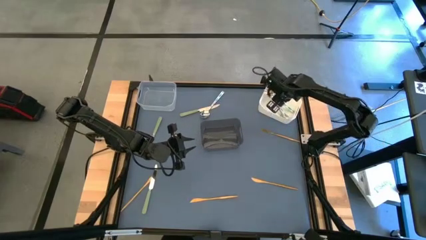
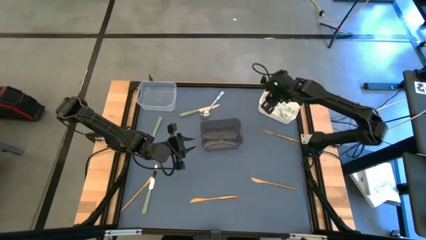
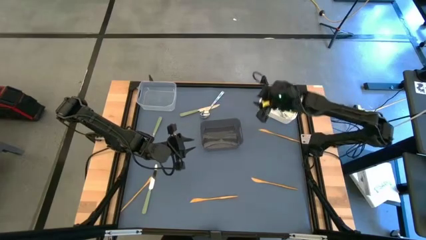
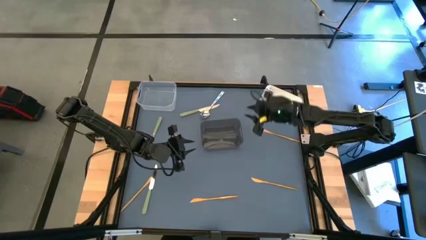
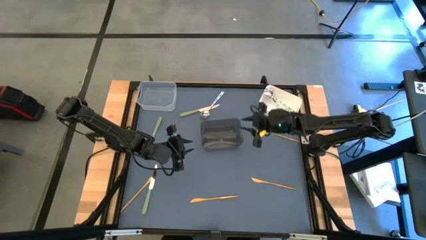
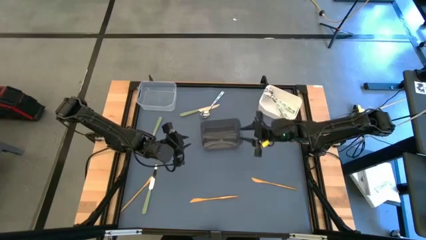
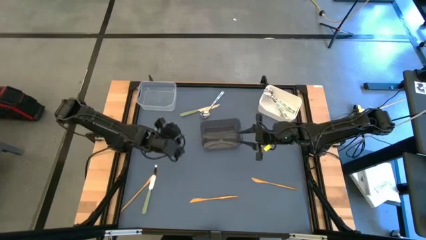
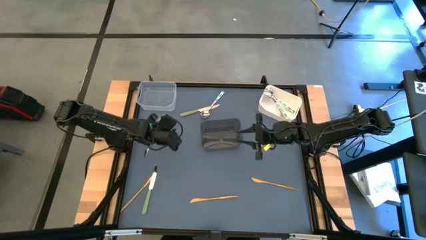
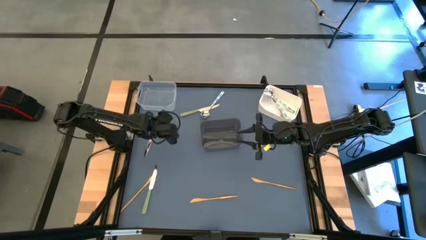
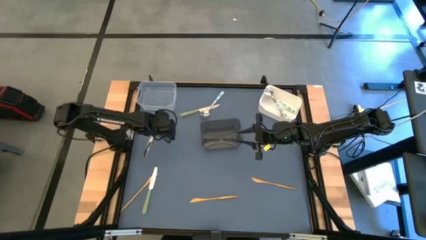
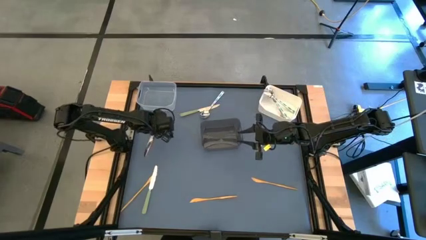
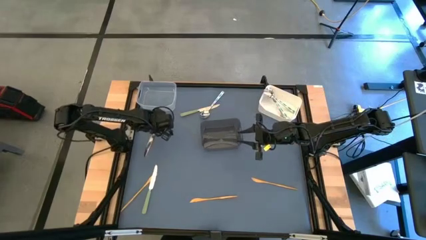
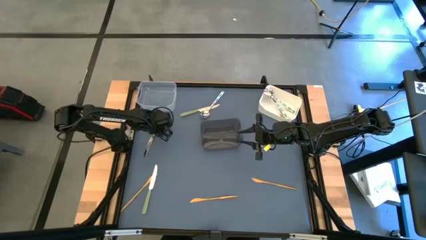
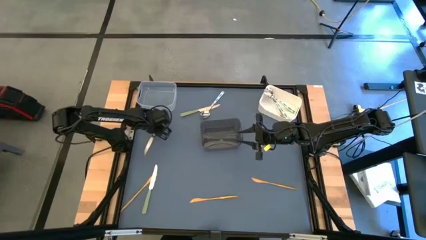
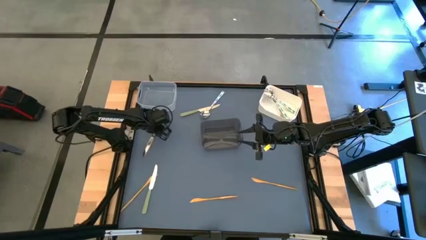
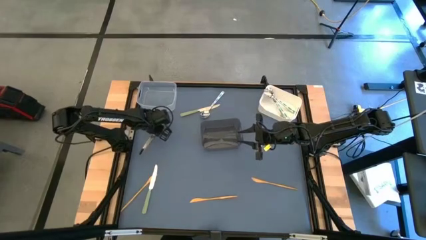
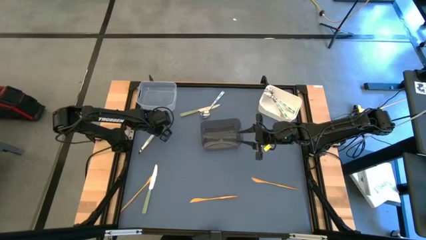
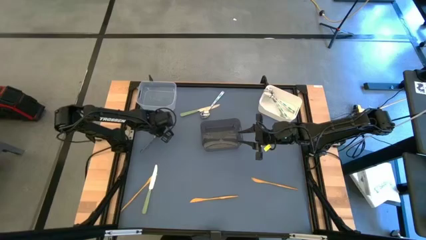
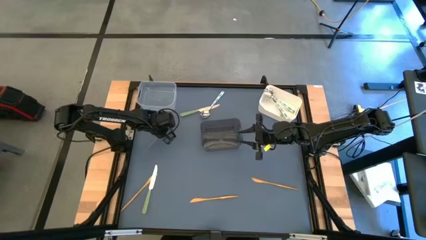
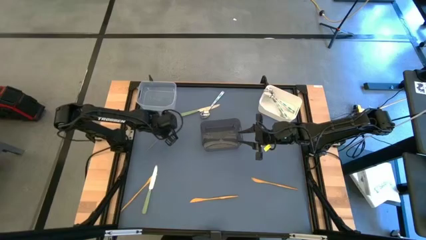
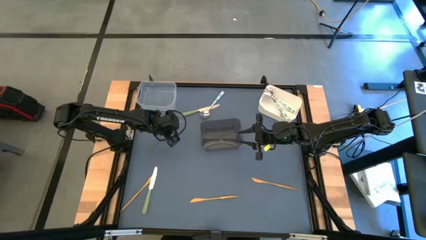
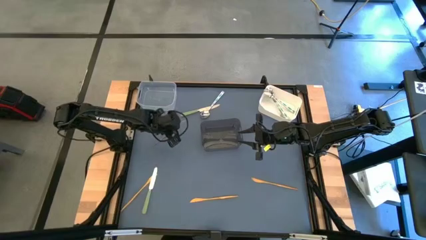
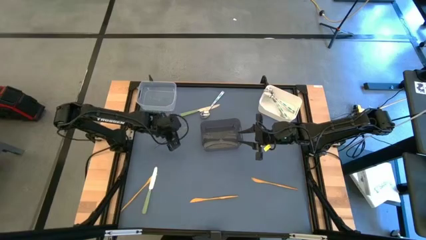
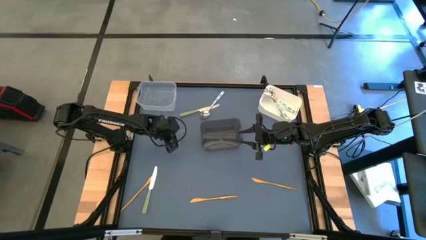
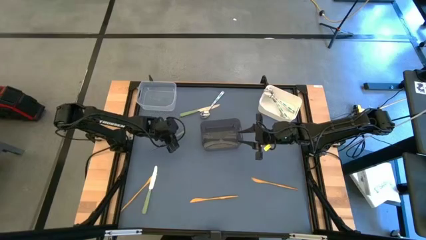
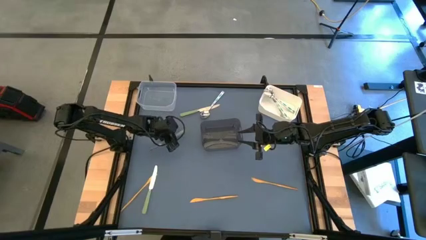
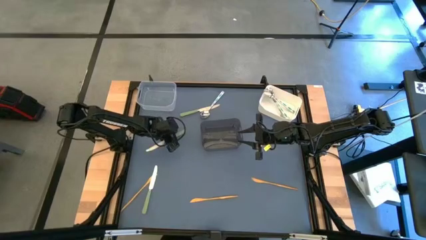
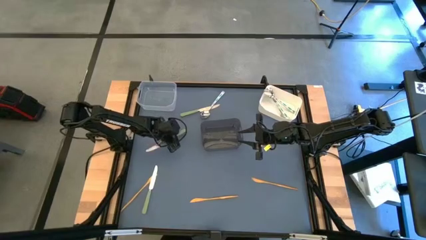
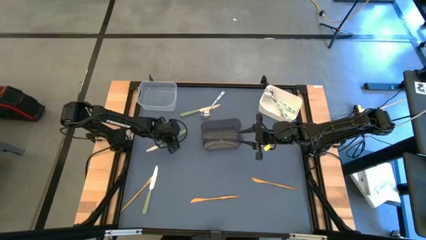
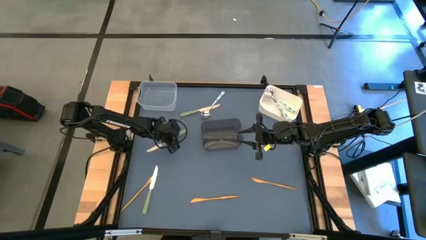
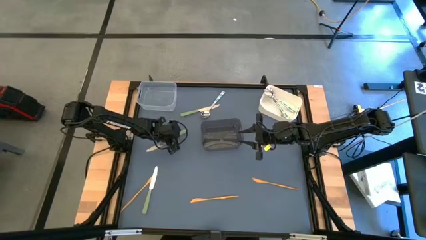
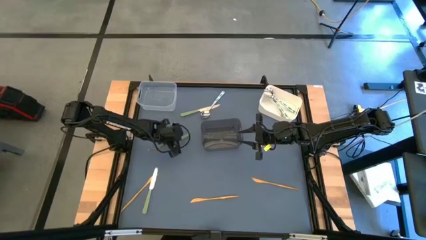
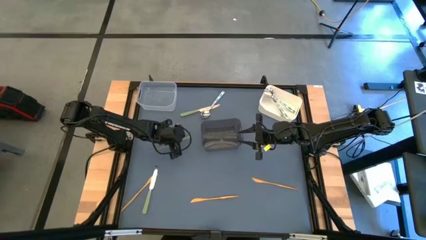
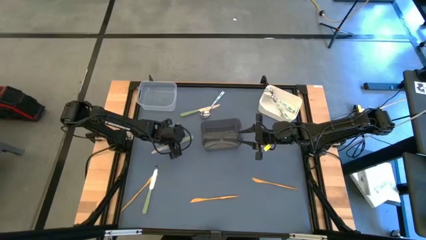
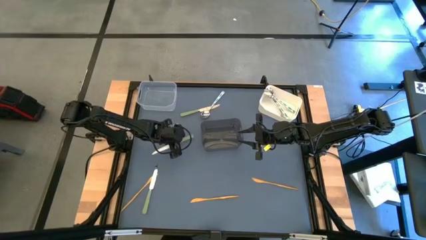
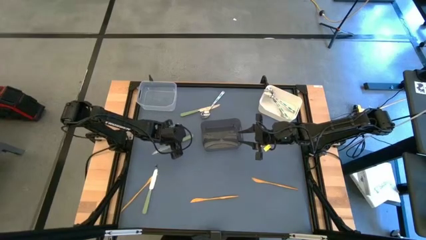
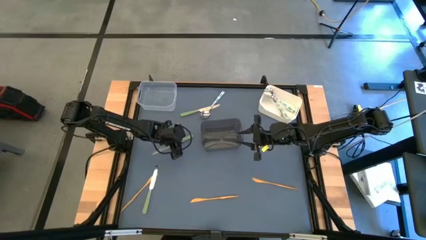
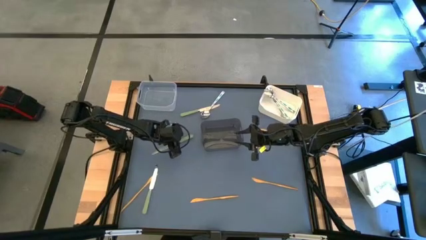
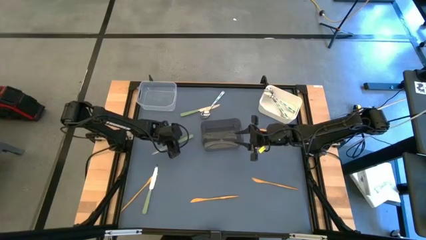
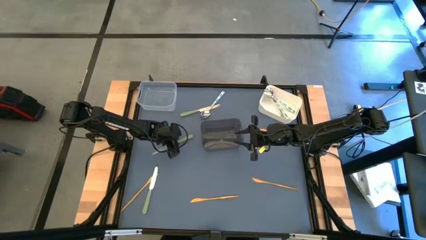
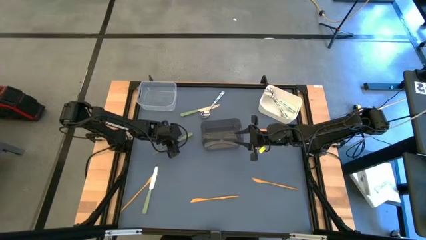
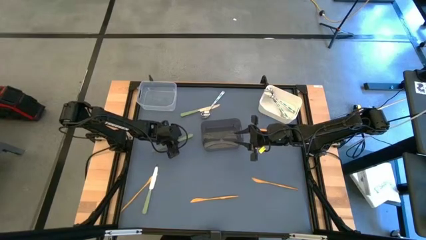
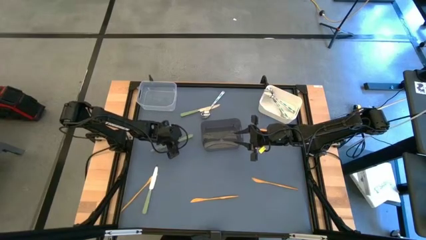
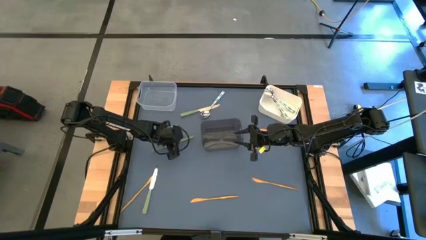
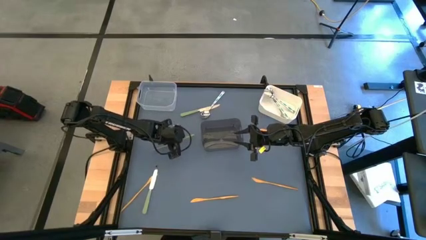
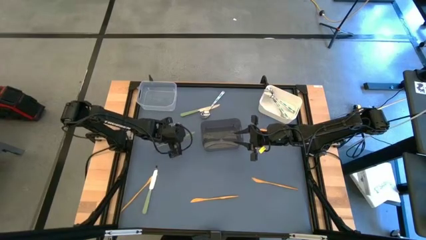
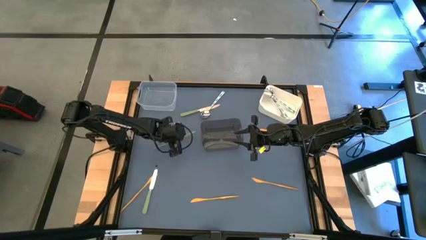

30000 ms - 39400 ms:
Task: Sort silverware by color (type)
Put the green knife into the transparent bin

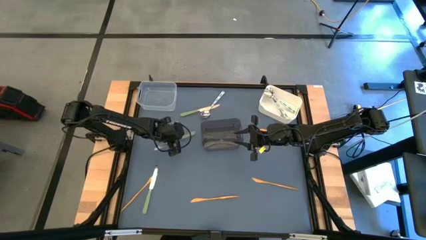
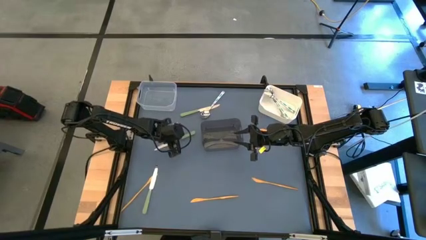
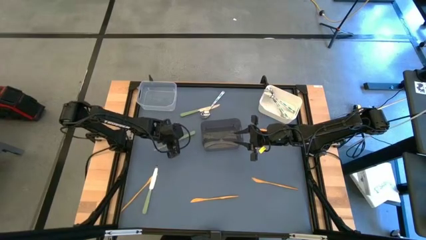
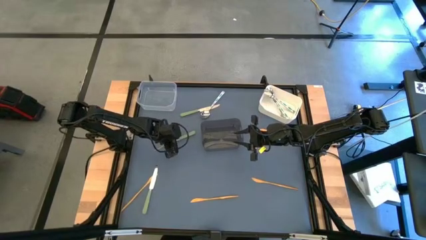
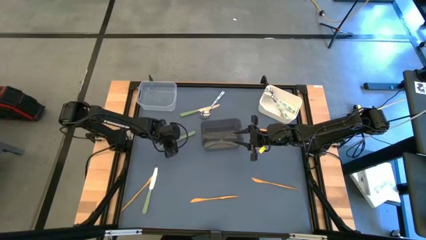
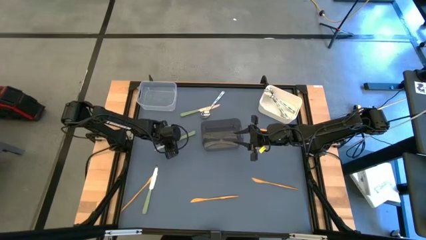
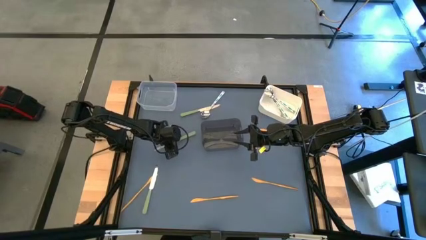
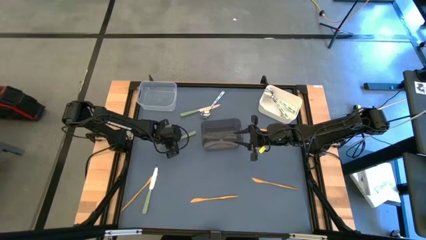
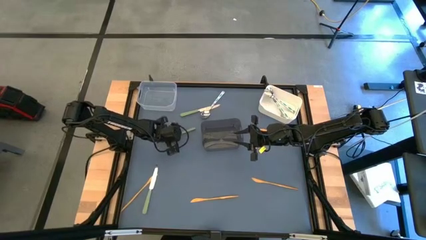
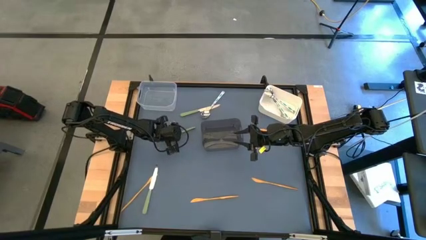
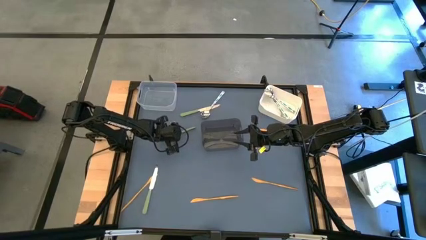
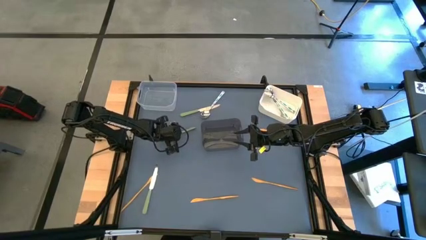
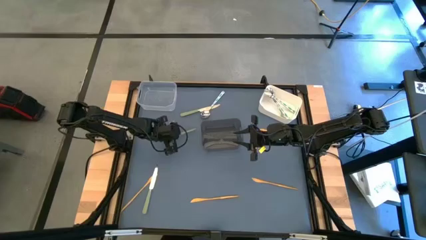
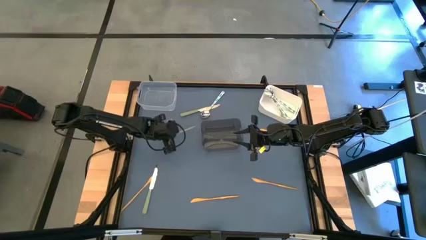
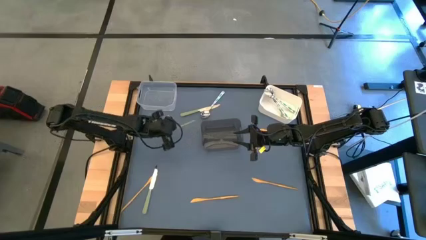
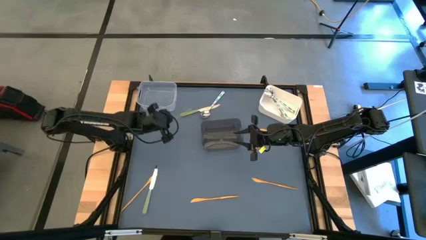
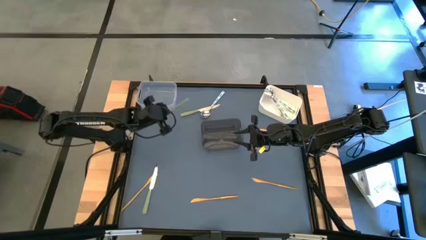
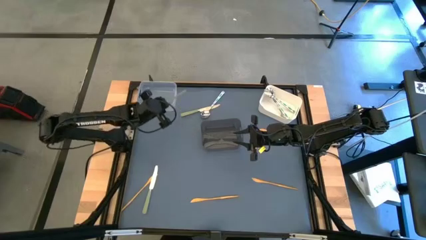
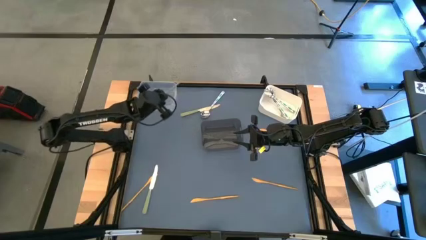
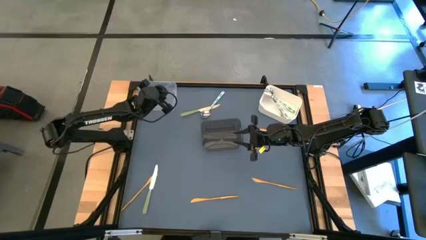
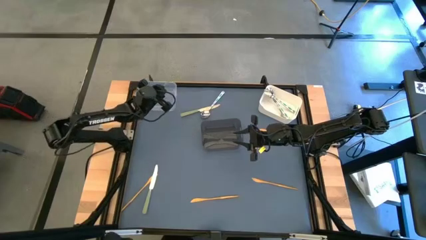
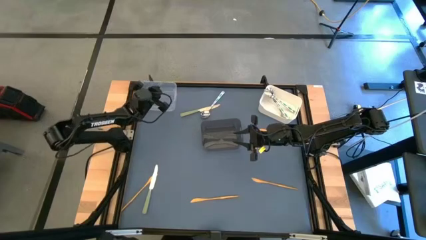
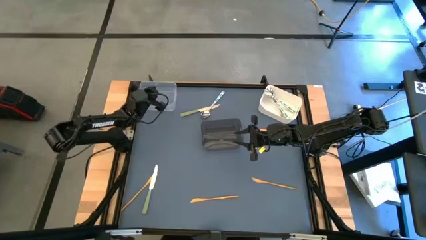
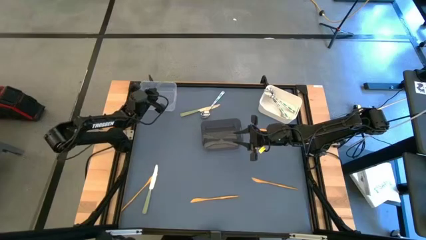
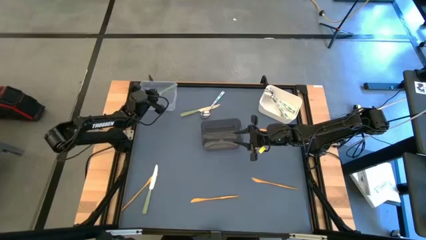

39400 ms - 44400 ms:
Put the green knife into the transparent bin

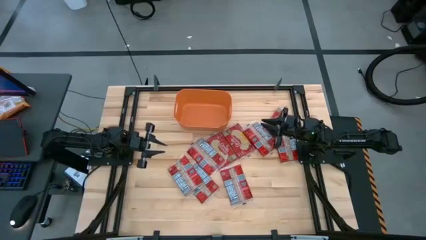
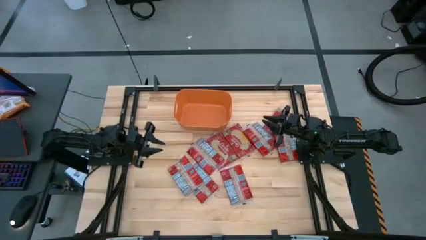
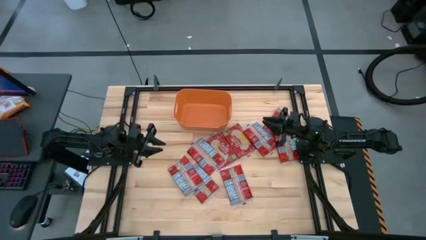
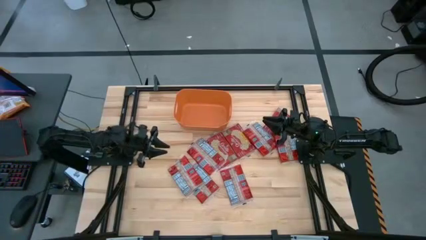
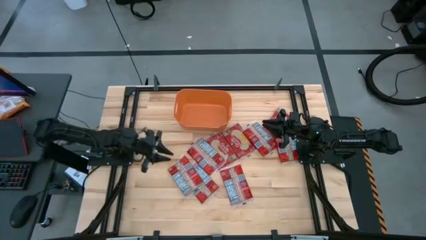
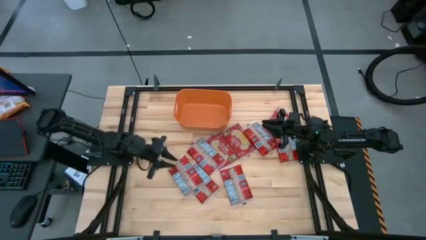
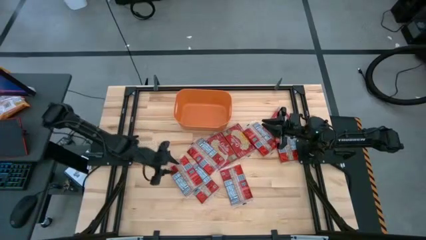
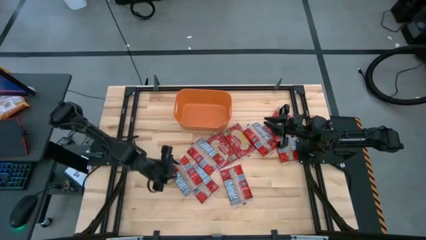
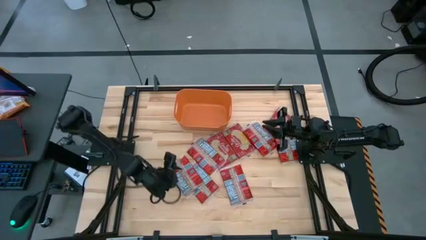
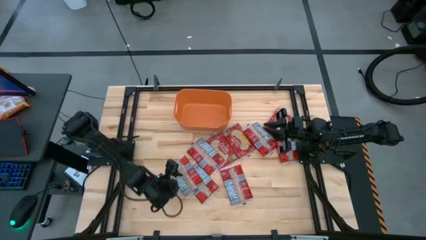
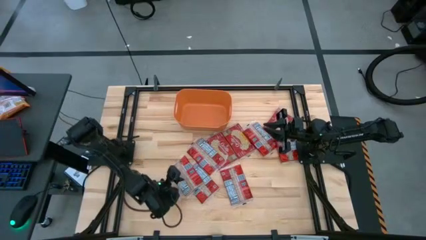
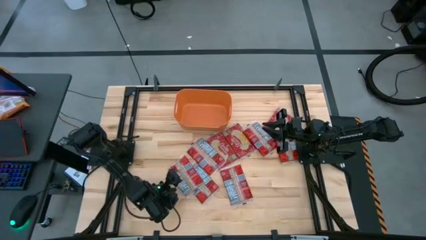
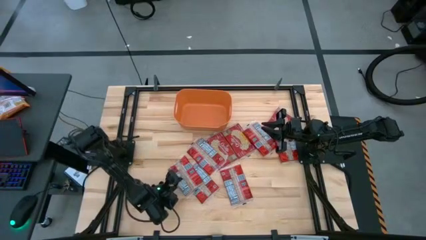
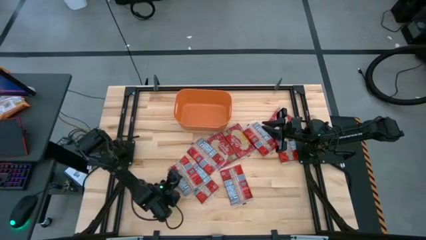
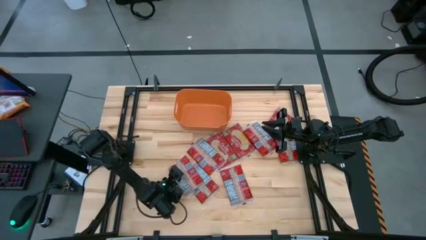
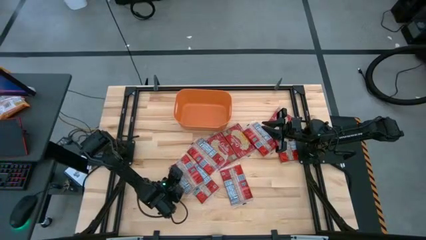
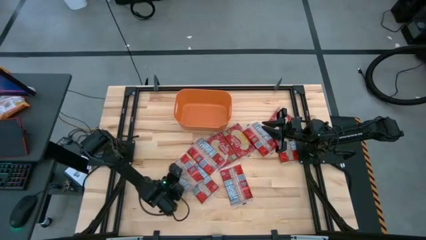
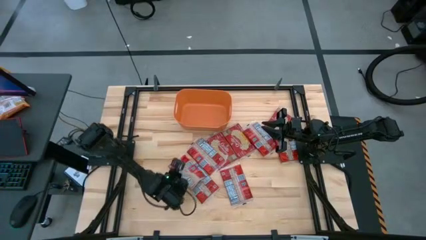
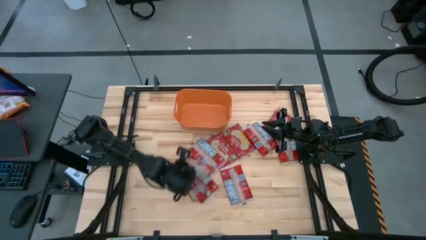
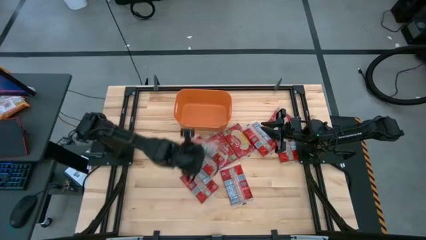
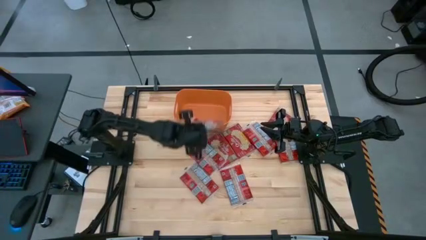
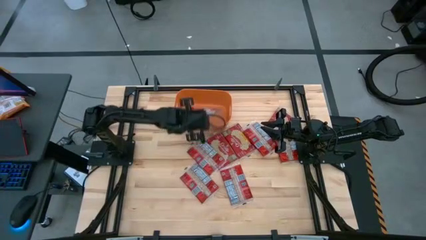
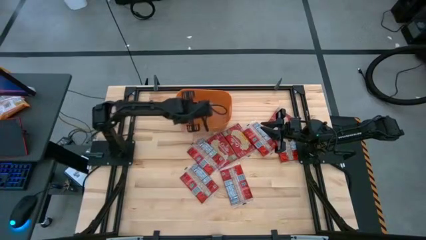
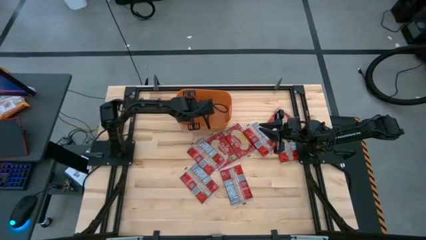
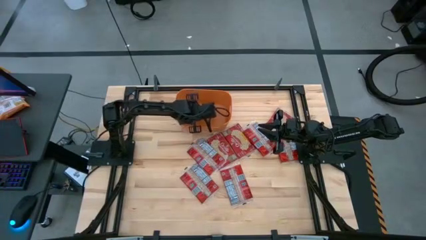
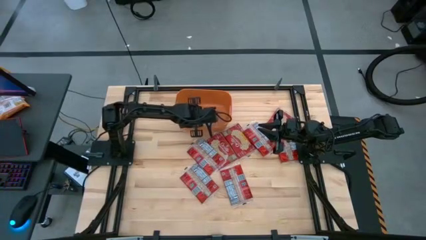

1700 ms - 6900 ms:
Task: Sort popcorn bags into baskets
Put the red popcorn bag into the orange bin
